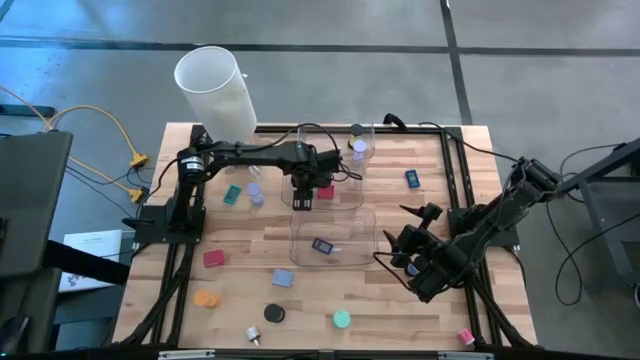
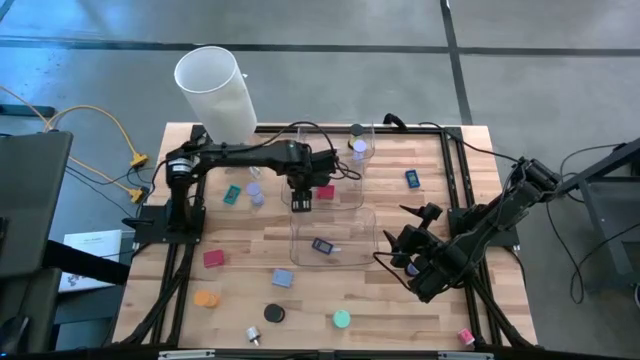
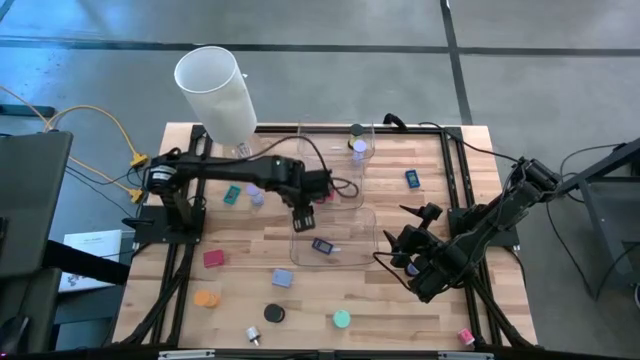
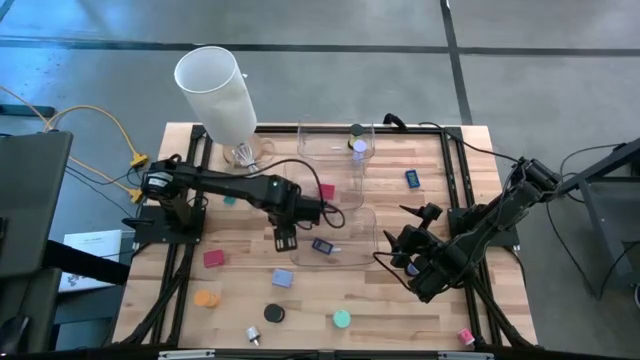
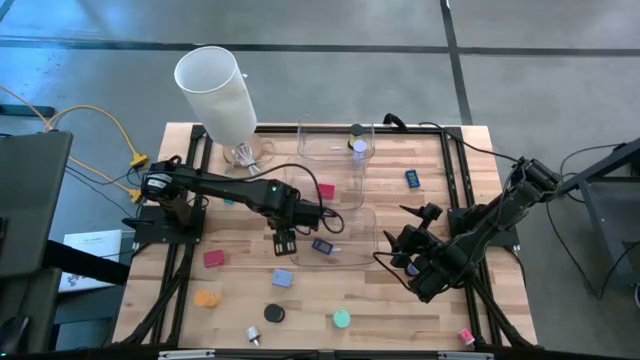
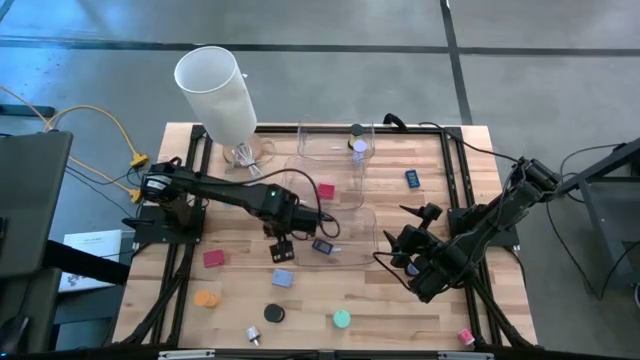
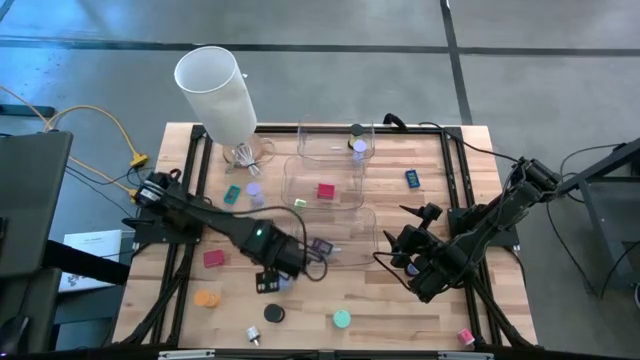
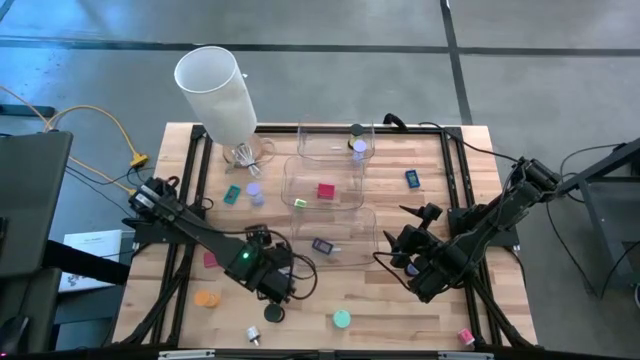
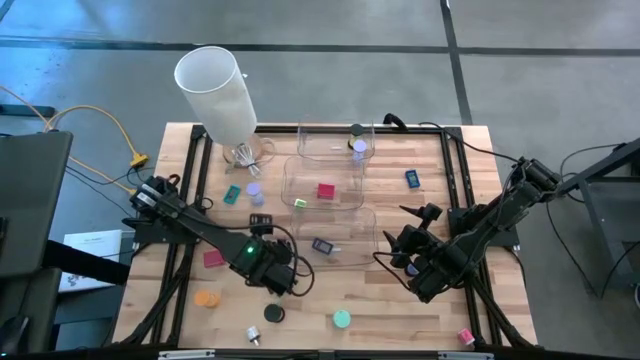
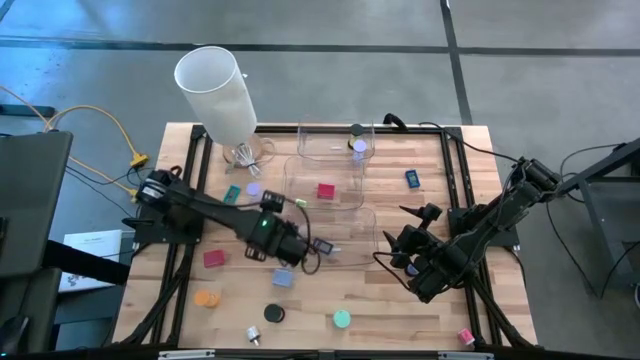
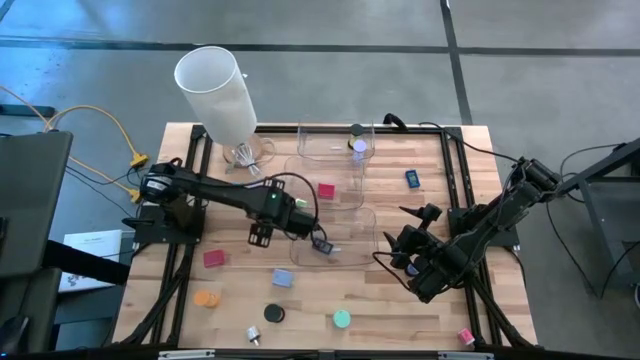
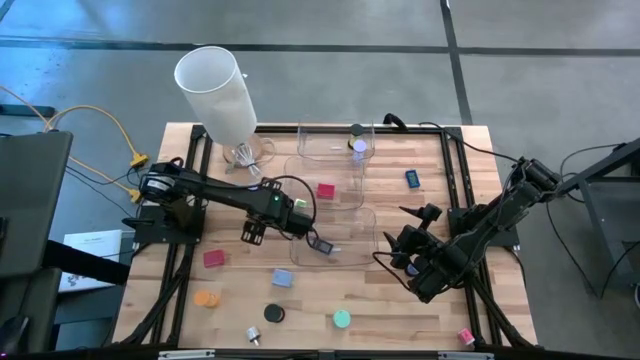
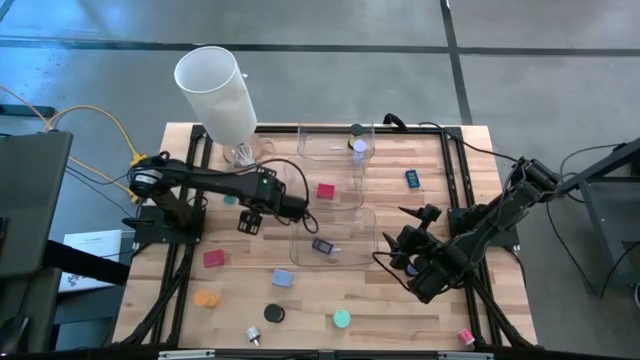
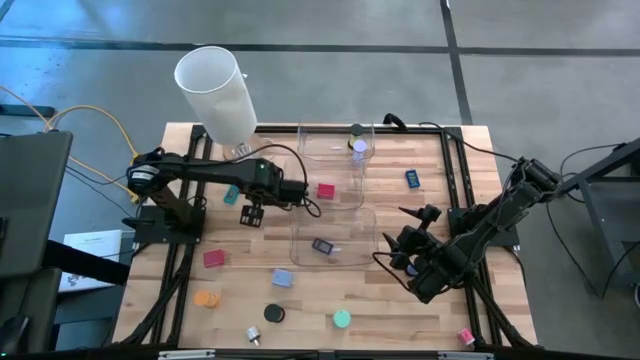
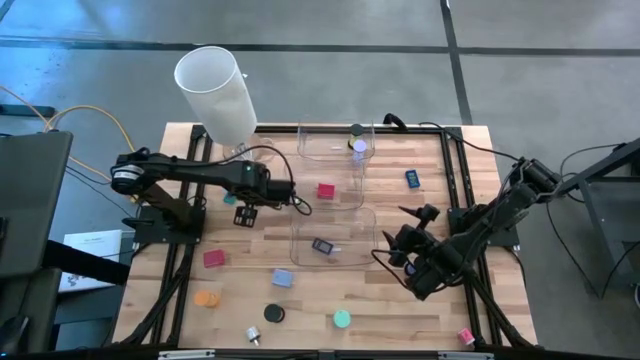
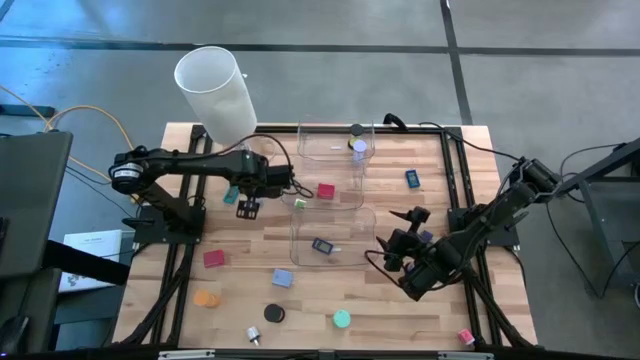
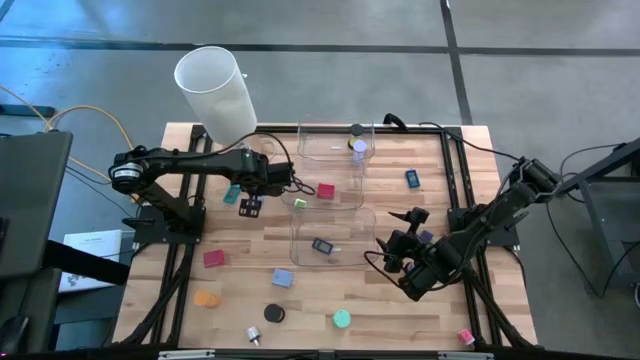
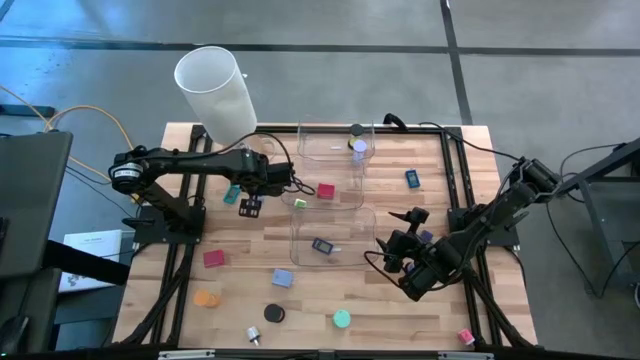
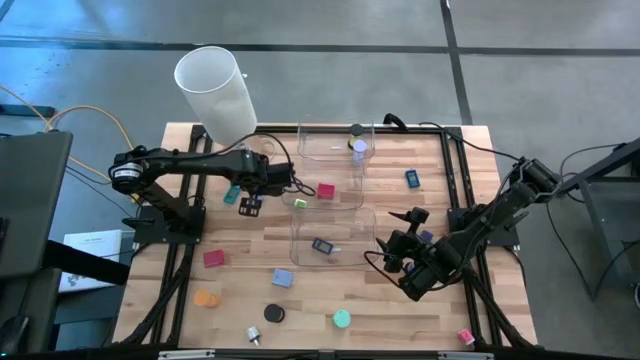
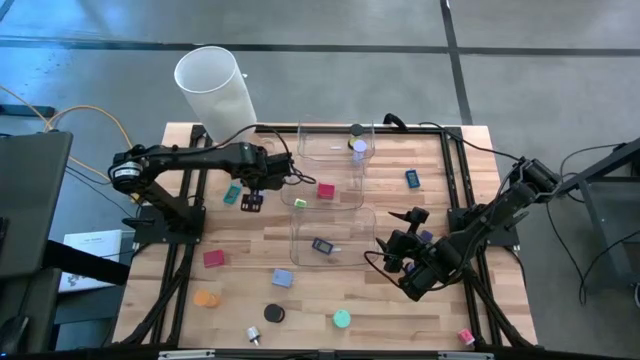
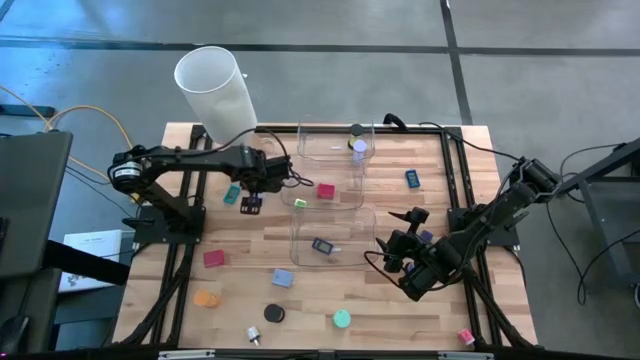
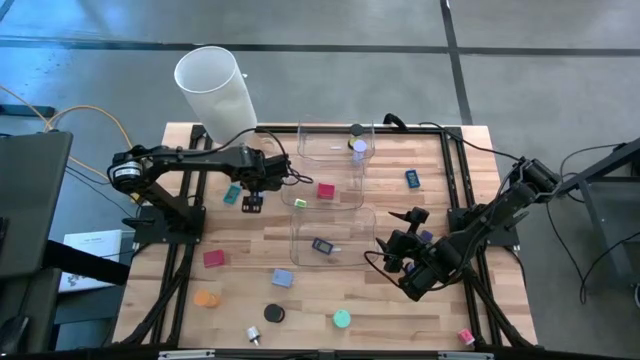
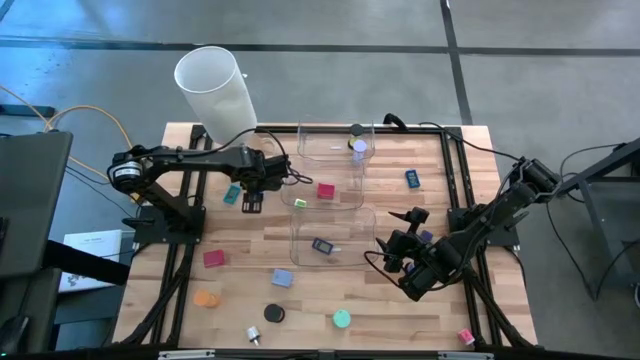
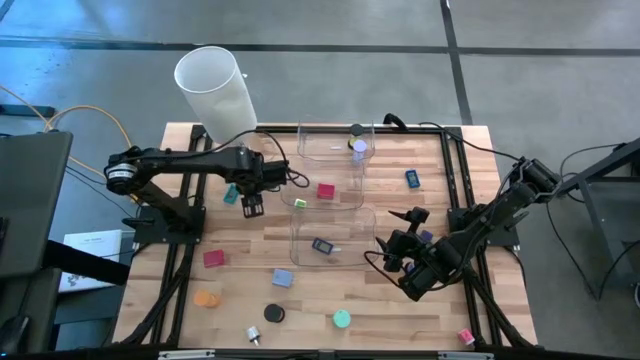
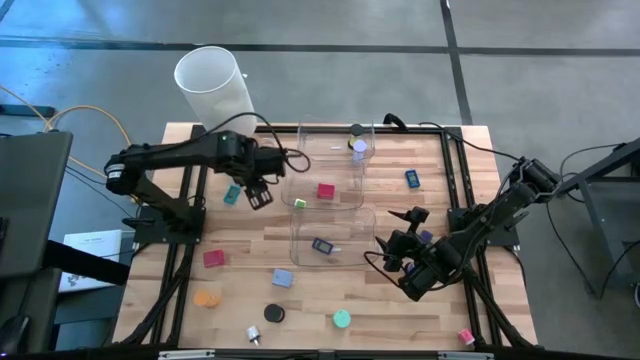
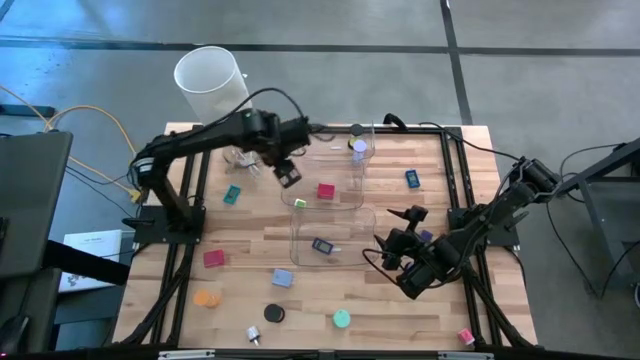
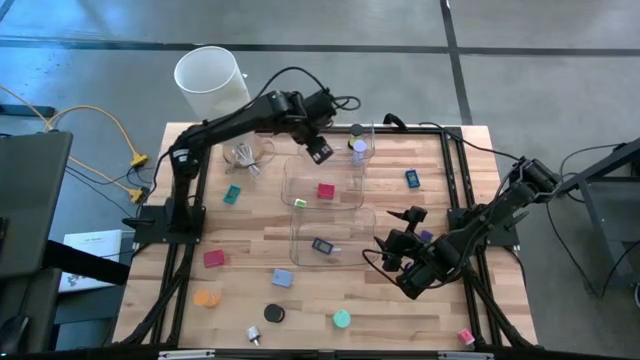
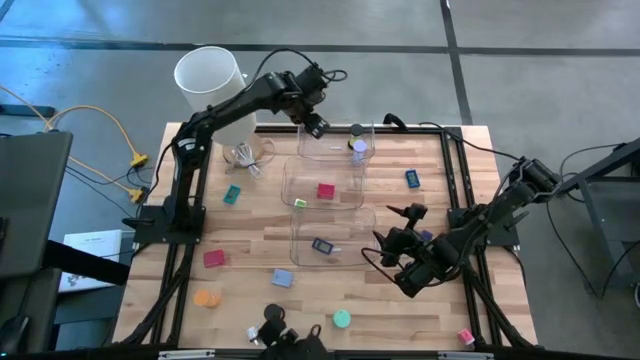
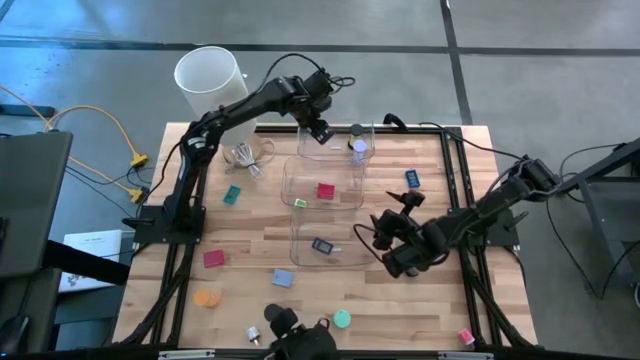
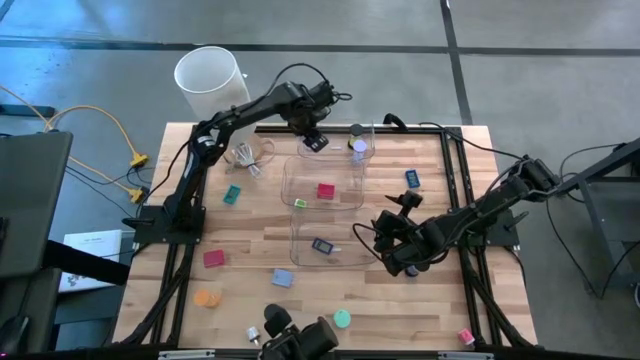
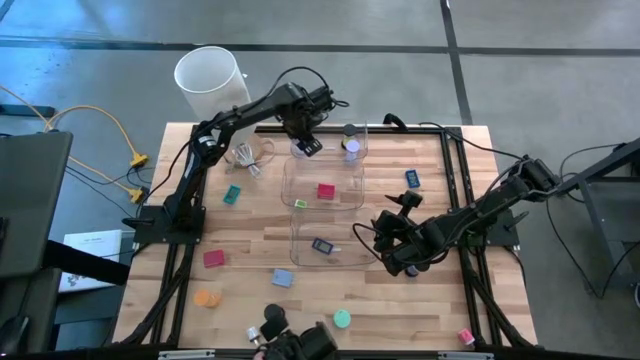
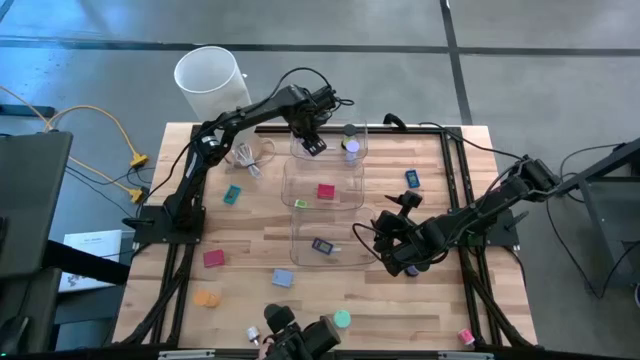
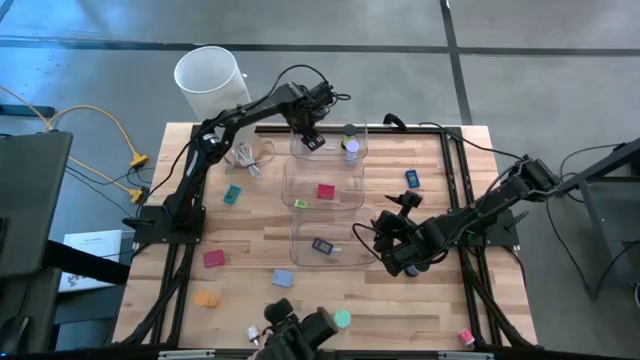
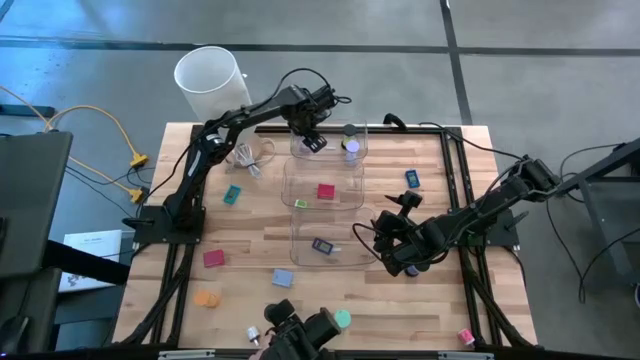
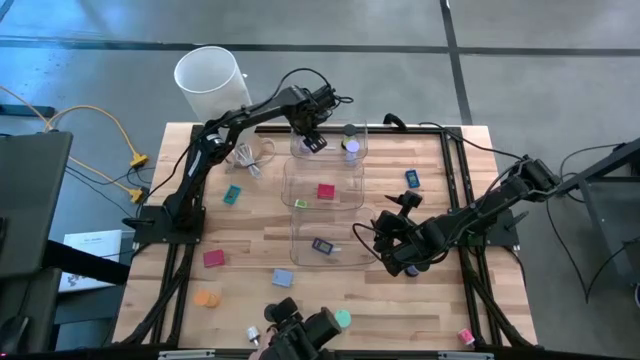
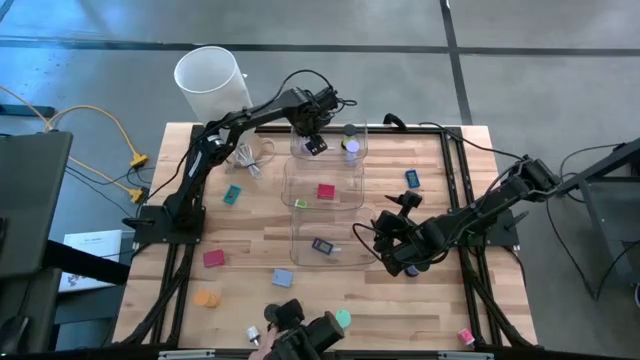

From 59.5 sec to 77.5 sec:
Task: Pick & Place Office items
Put the light purple hourglass in the middle transparent bin

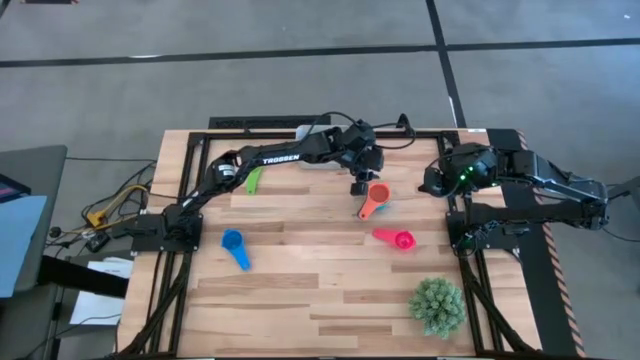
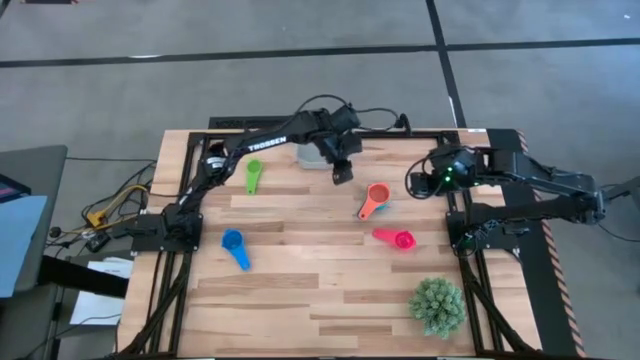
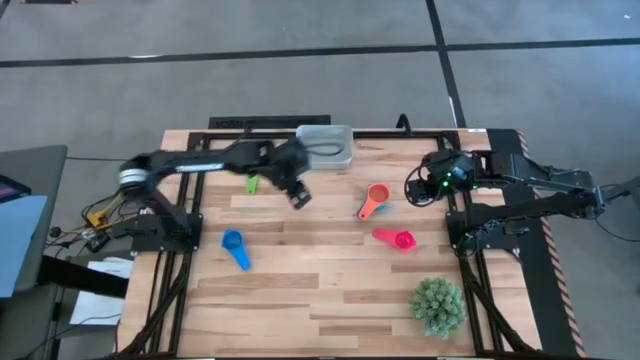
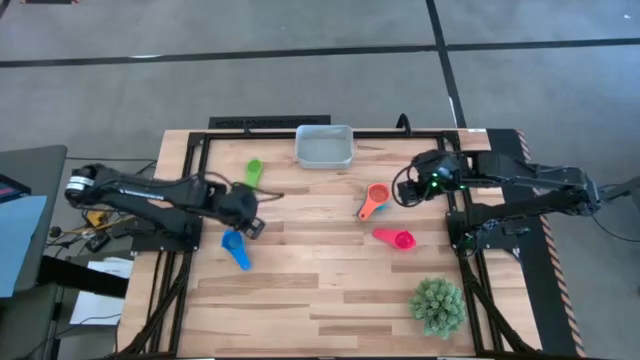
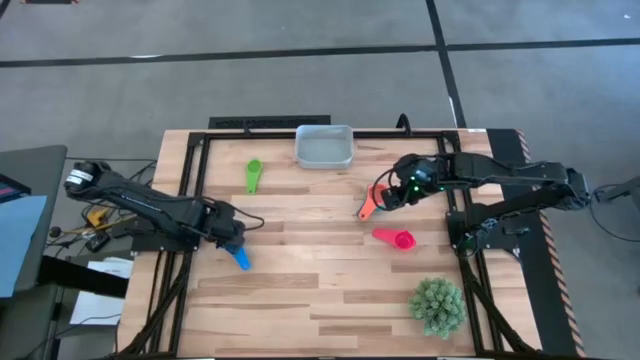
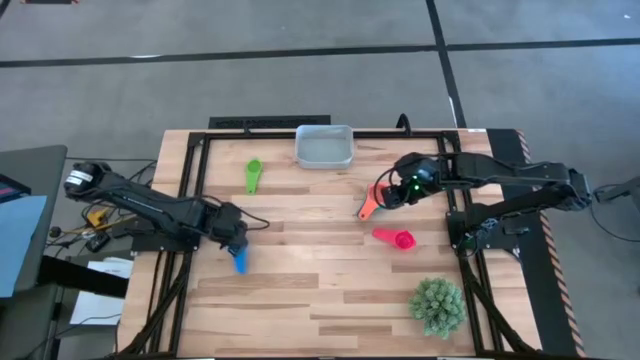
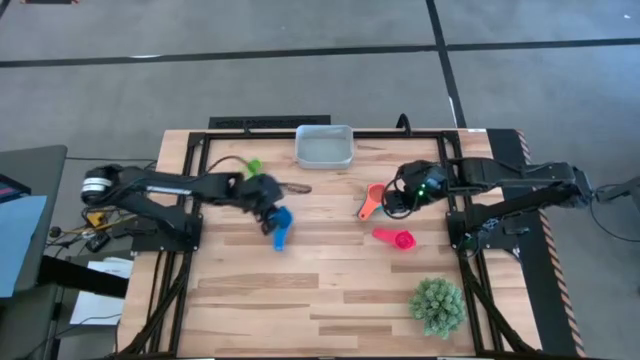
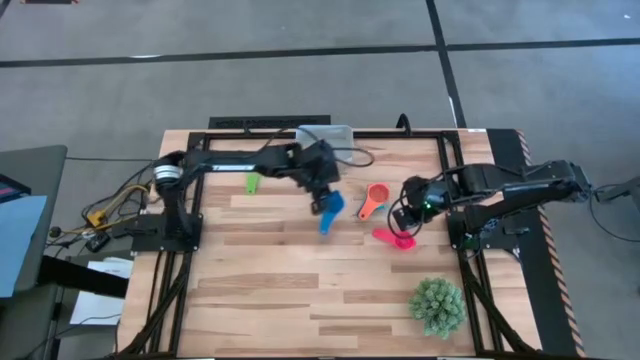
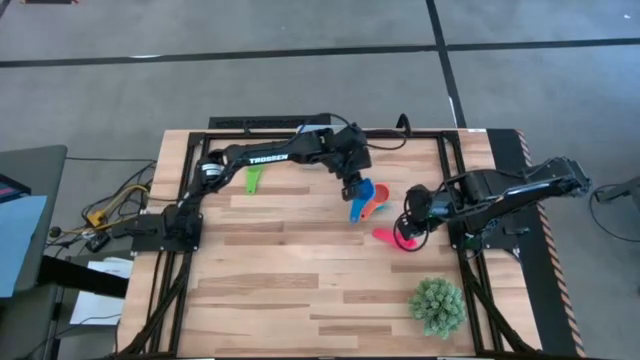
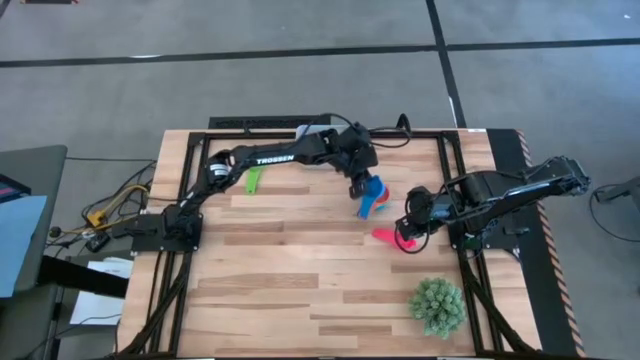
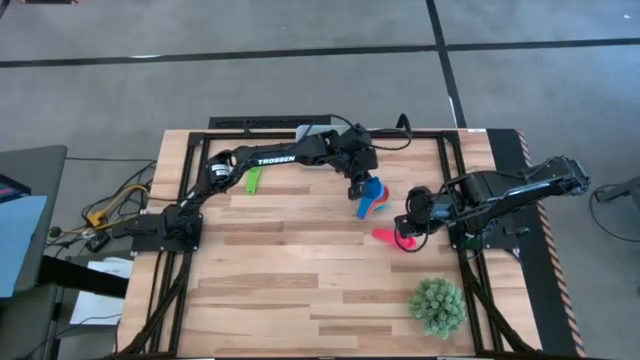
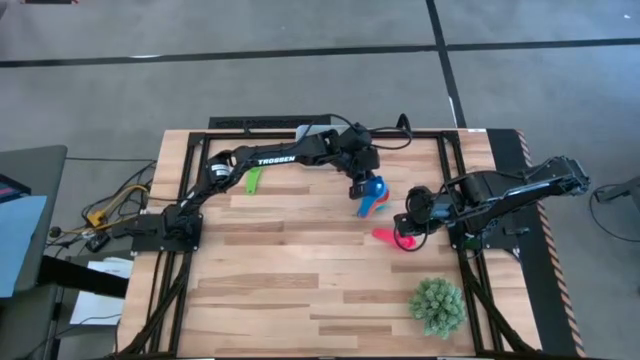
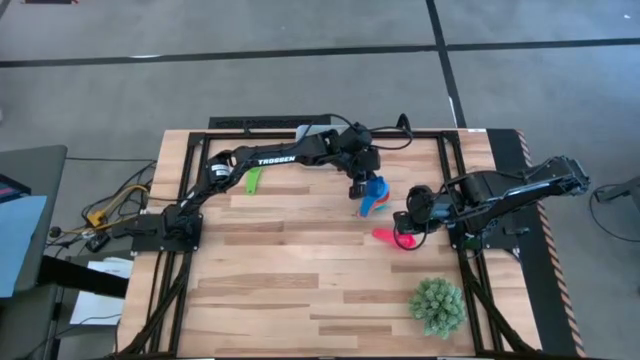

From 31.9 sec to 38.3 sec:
Task: Nest measuring cups in basket
Stack the blue measuring cup on top of the orange measuring cup
